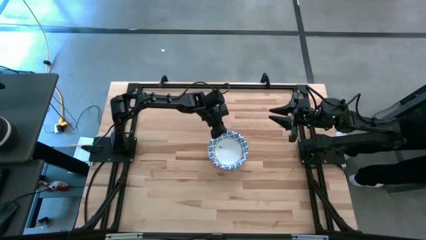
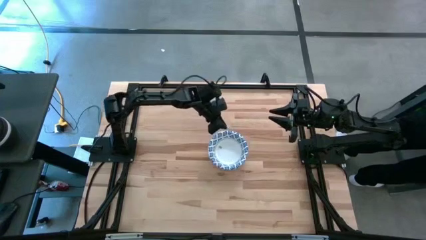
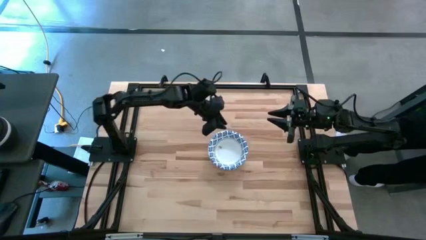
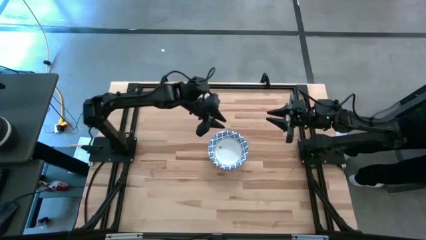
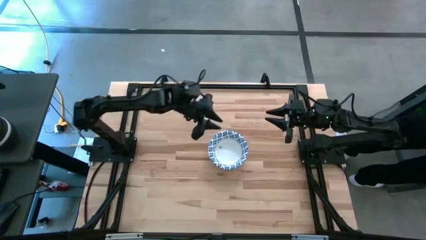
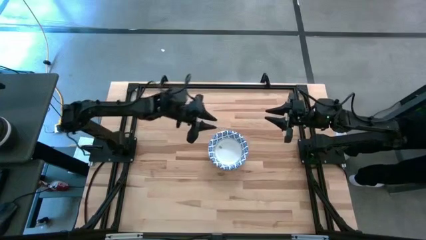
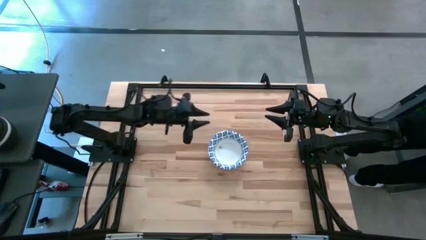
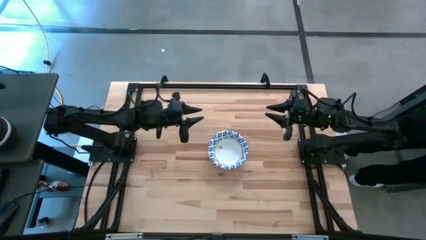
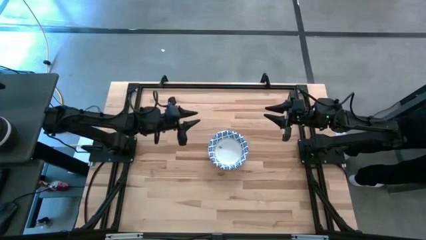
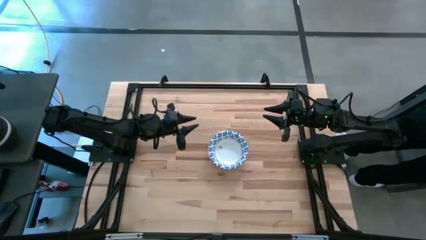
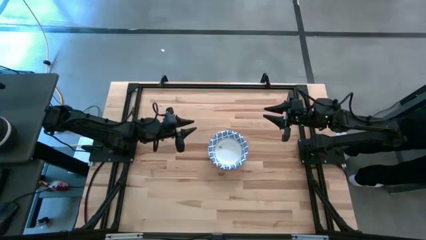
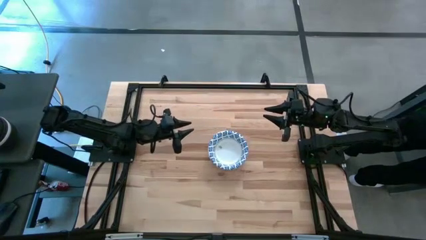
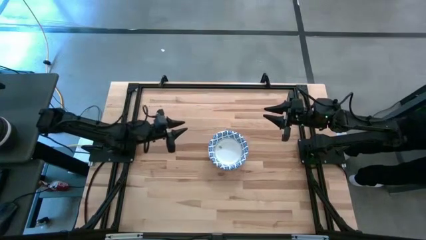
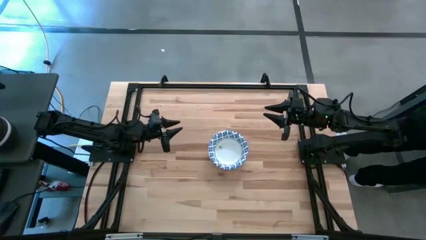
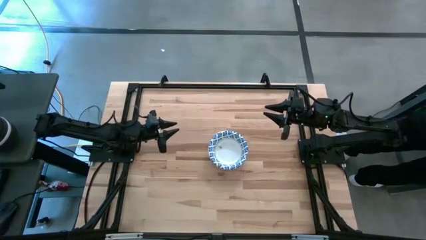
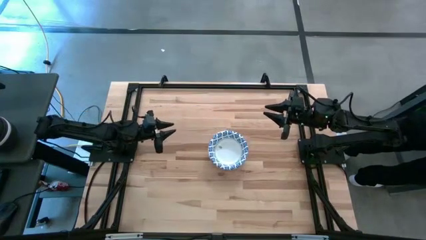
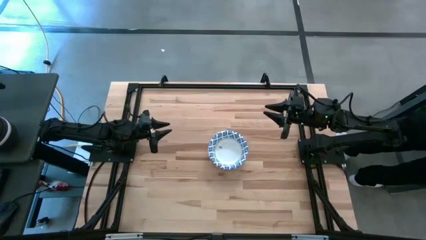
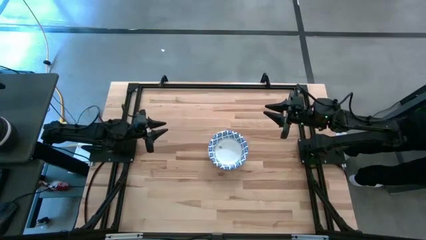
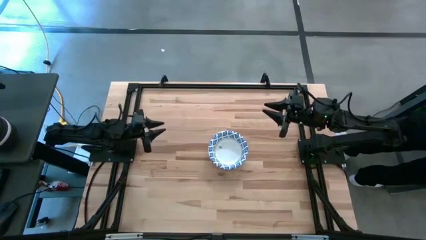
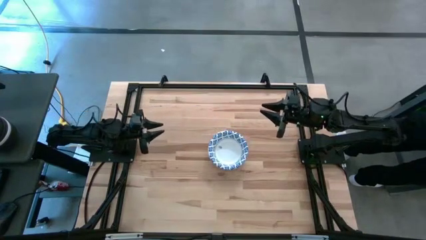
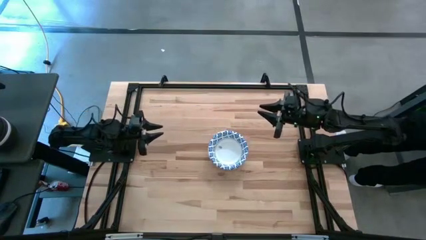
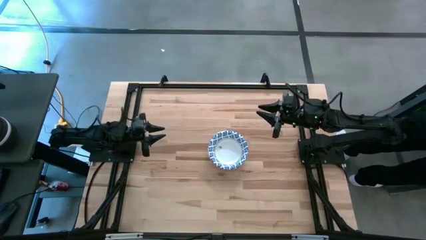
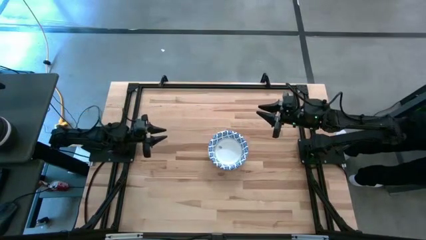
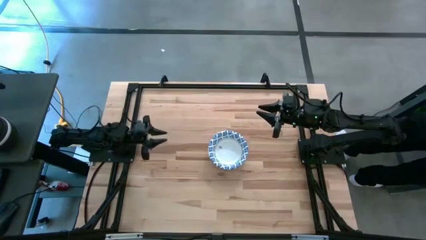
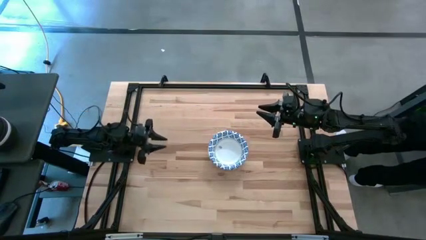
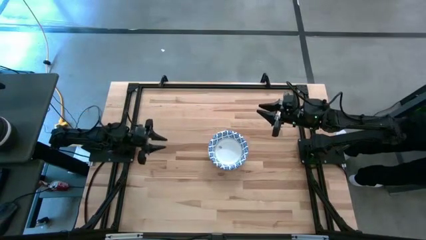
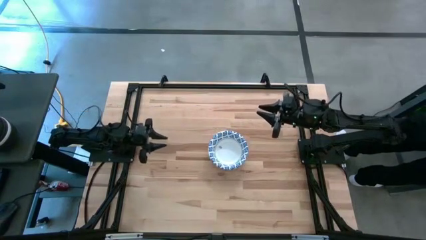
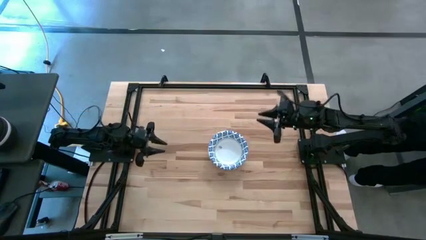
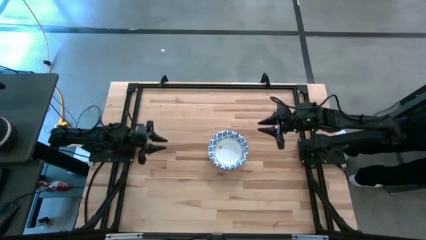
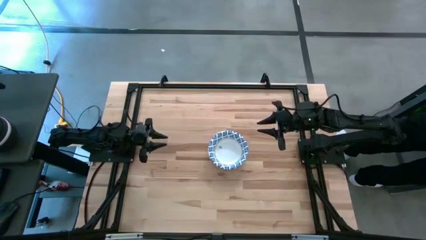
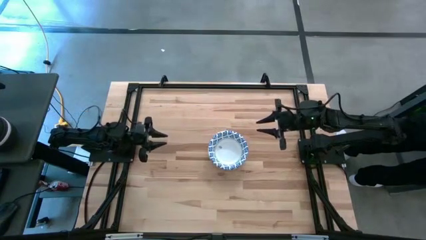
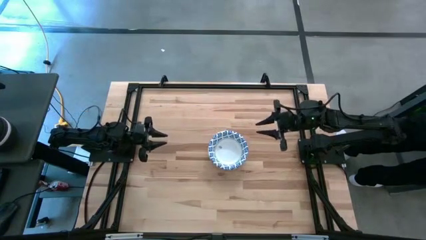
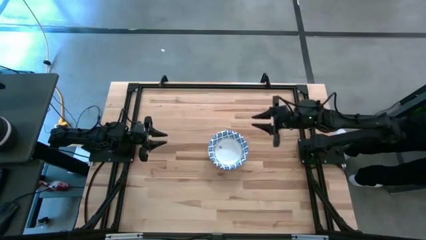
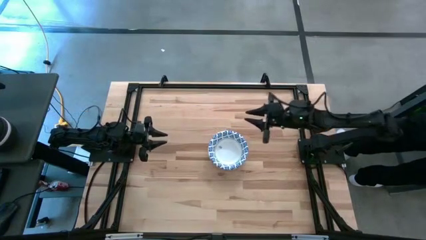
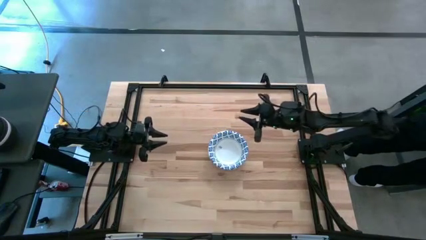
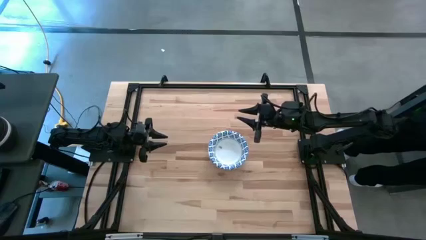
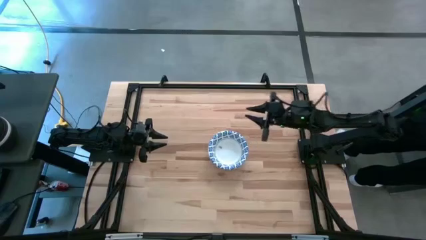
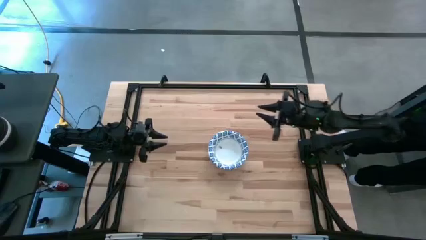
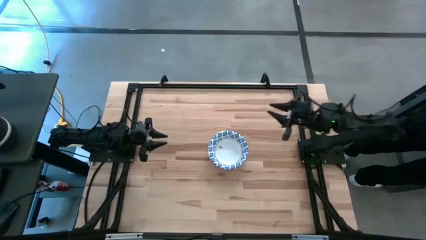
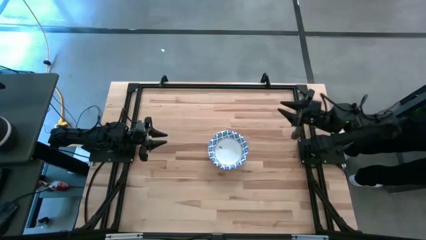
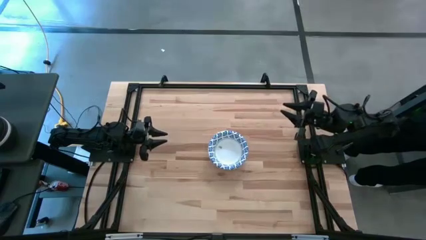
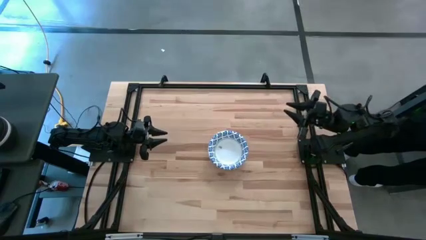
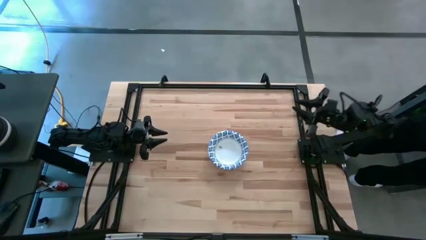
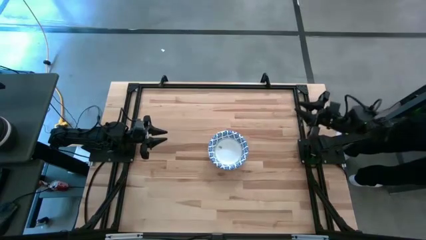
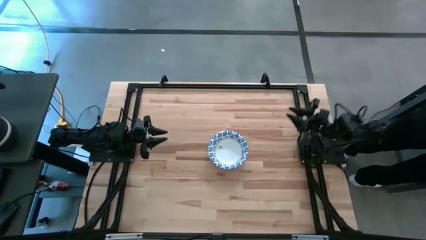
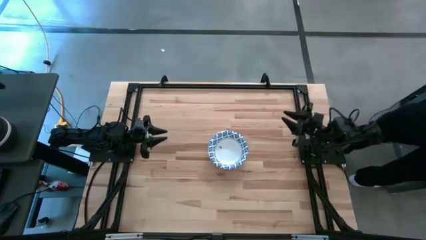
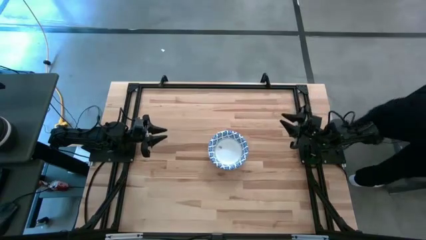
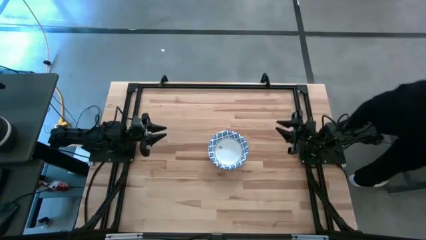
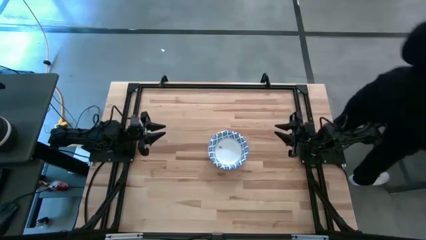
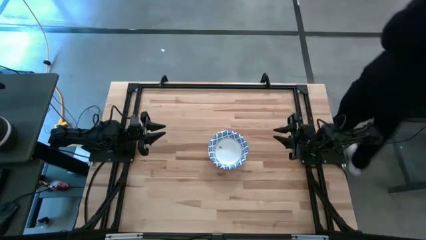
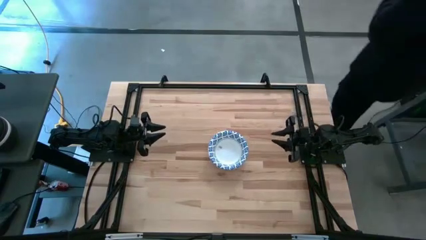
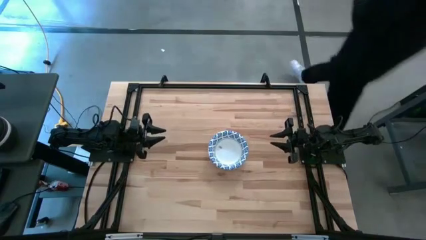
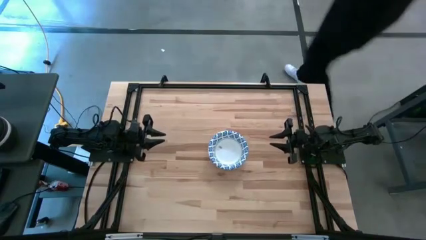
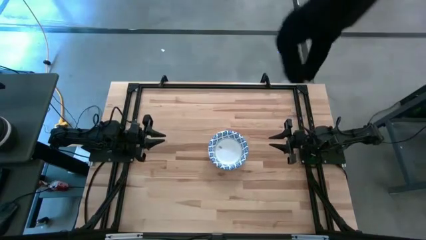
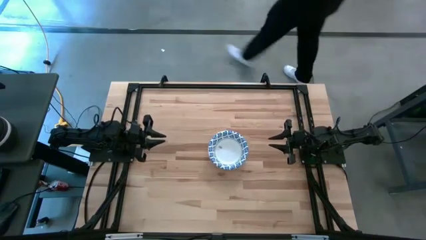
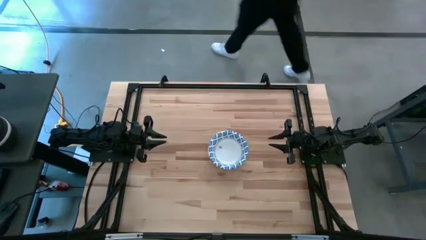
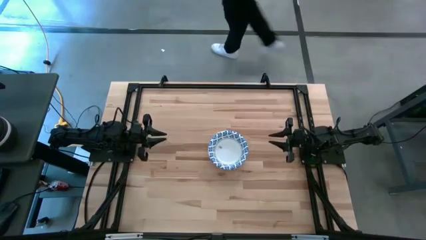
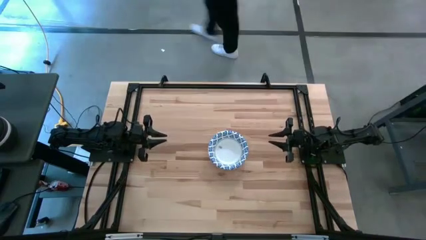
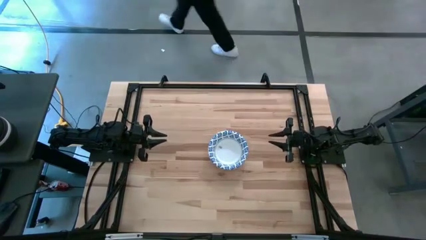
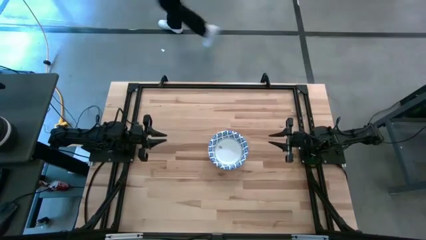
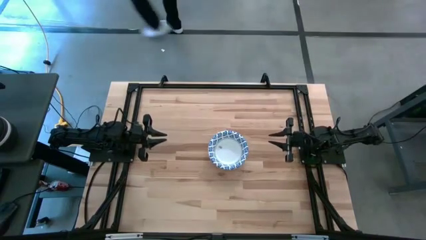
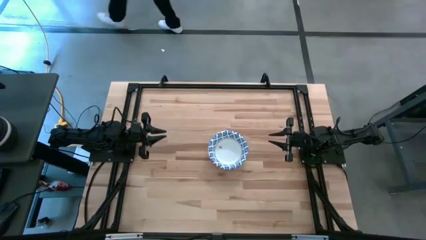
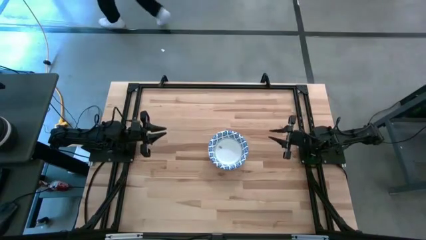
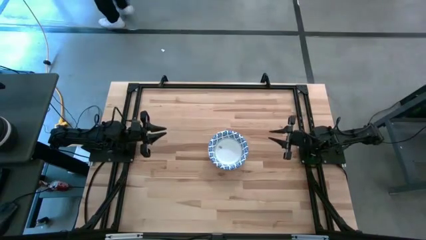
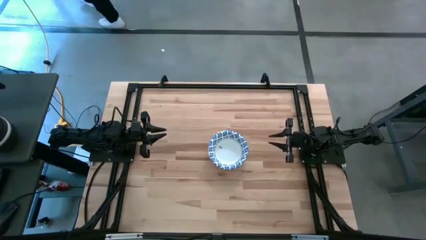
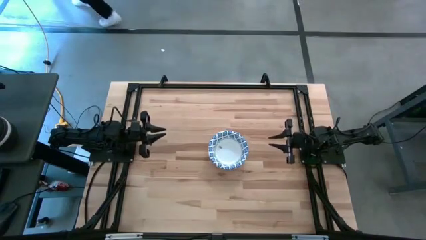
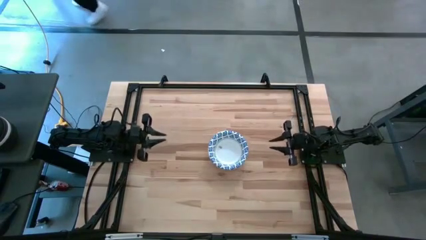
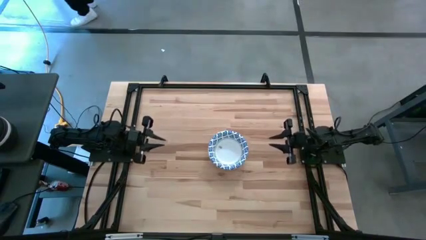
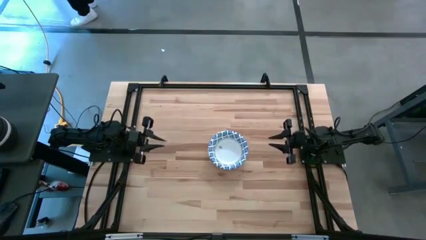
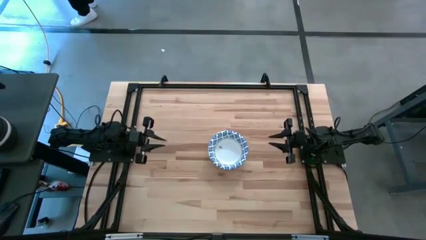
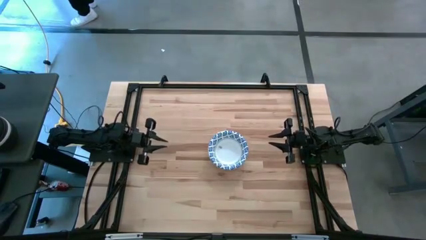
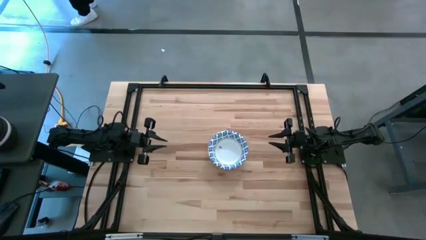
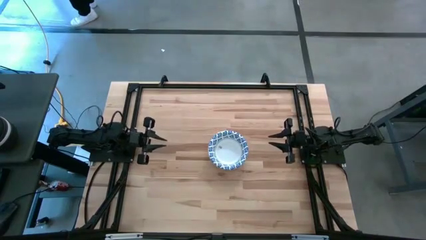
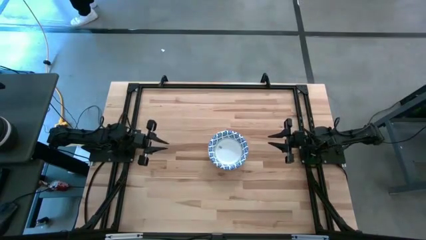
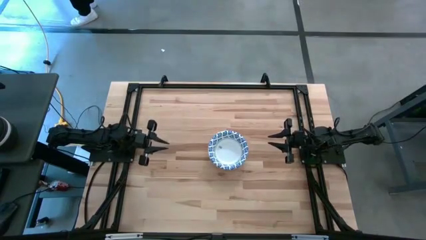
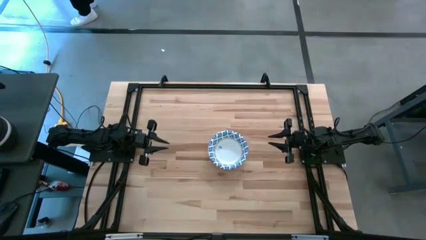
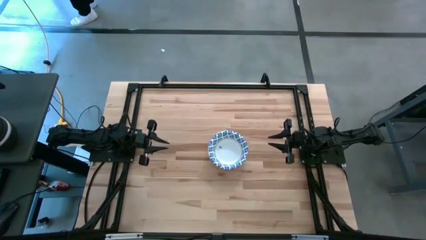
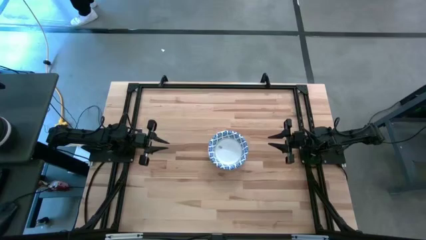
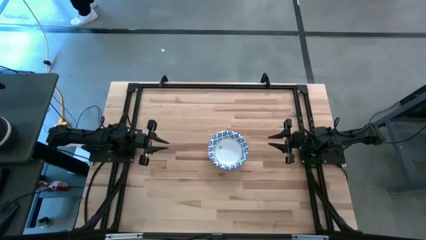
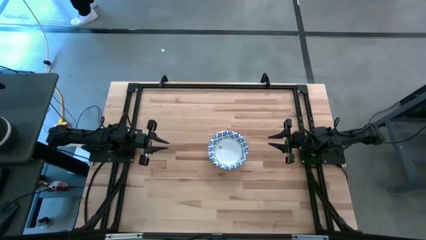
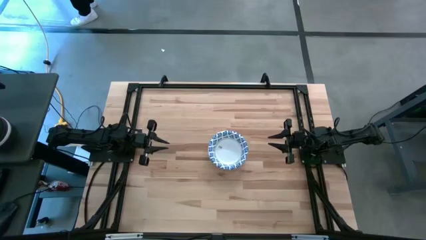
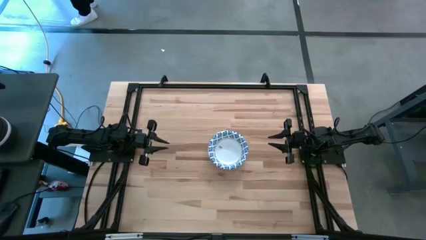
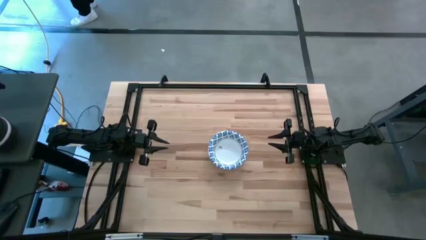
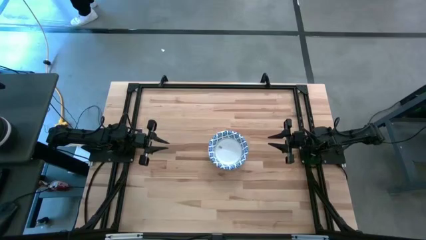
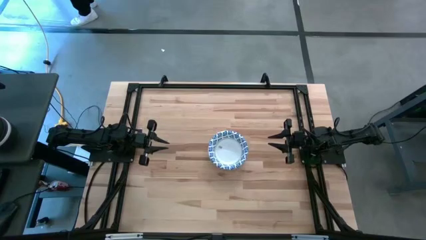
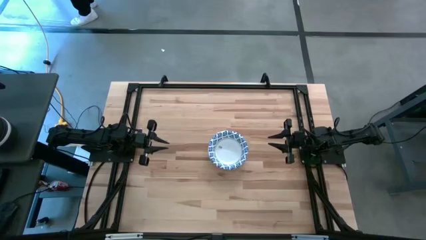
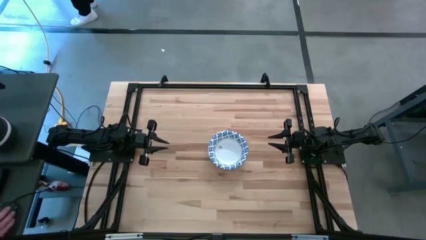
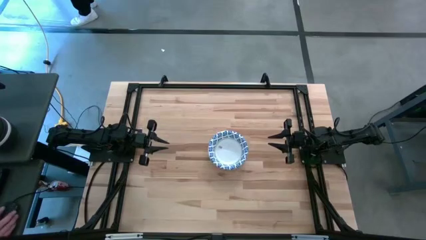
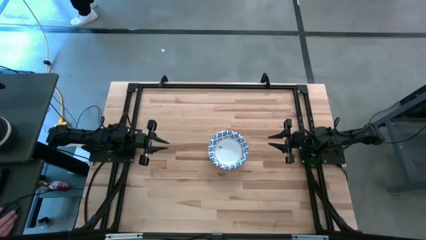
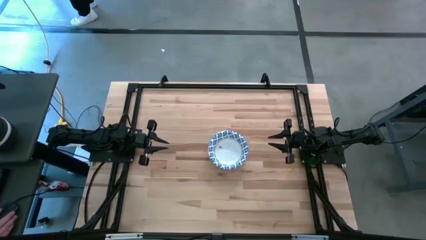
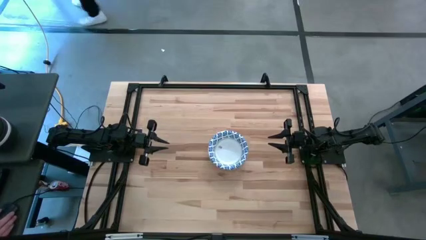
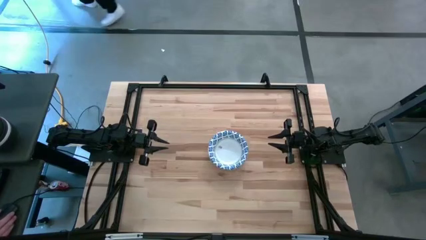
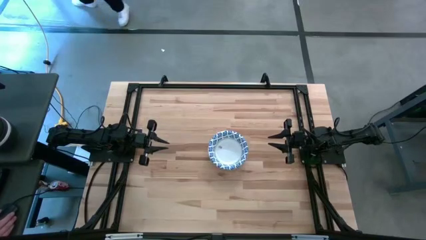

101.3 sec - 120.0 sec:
Task: Nest bowls inside each other
Return to Home Position
